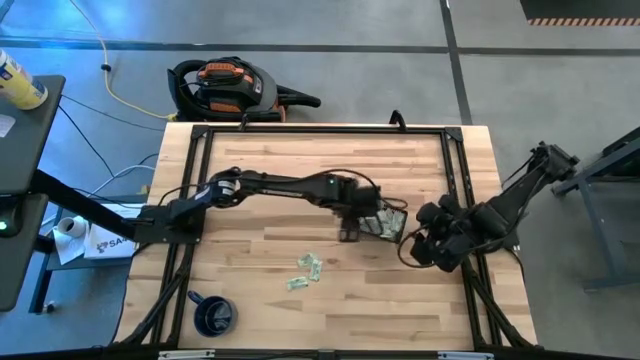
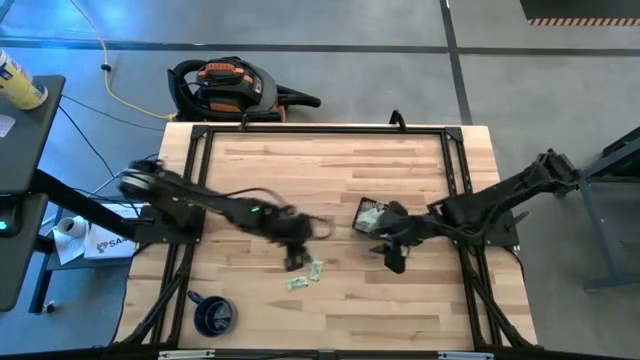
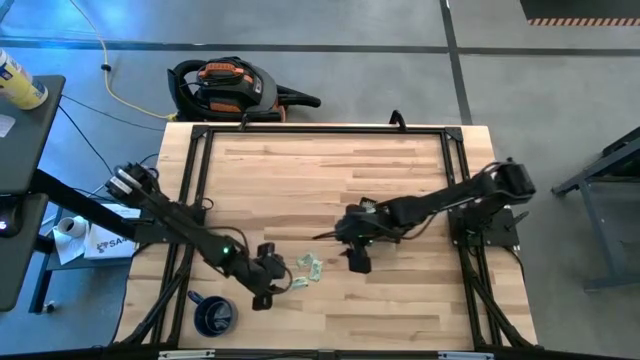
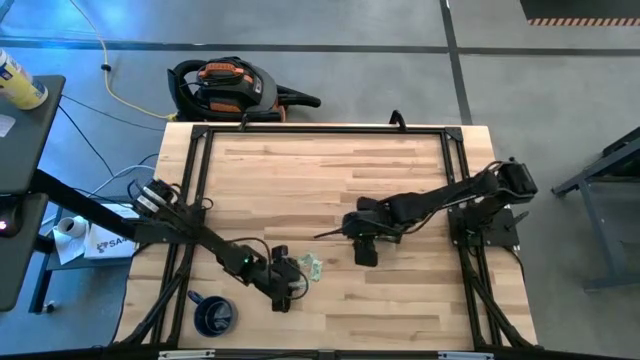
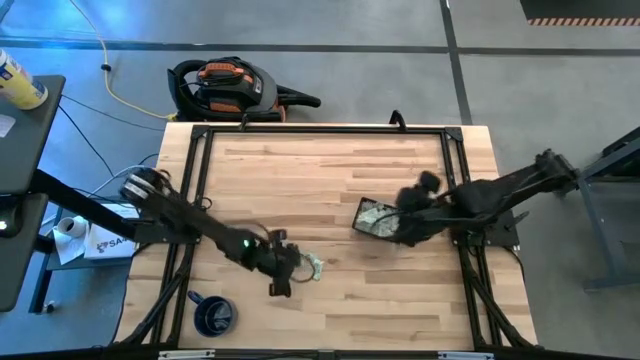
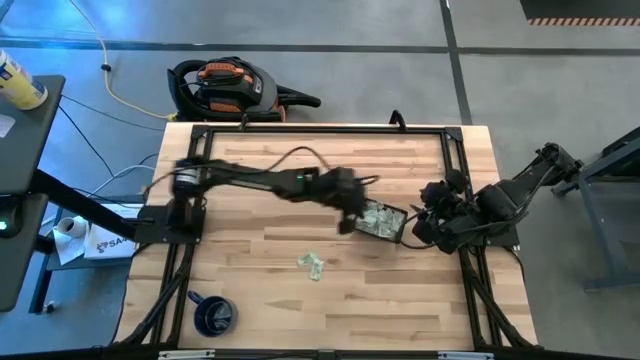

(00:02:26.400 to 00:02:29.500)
Task: Pick and place Stevia / Truvia into bins
Put the stevia packet into the black bin

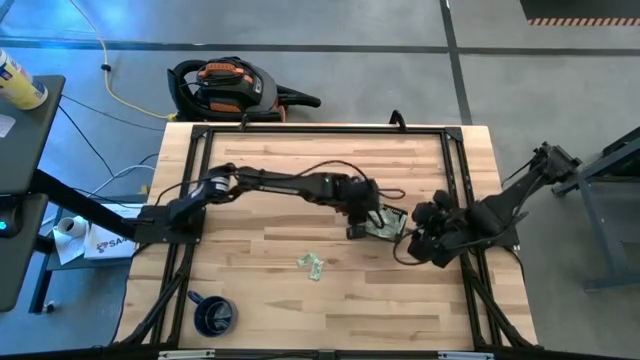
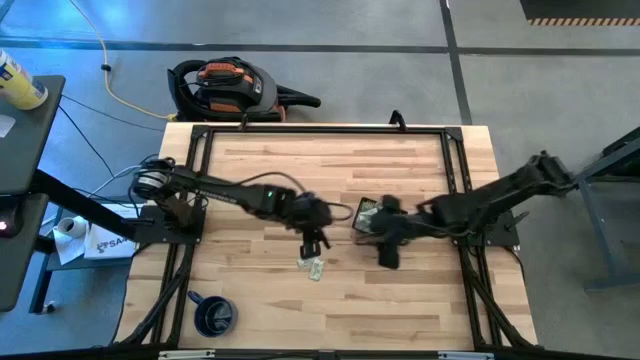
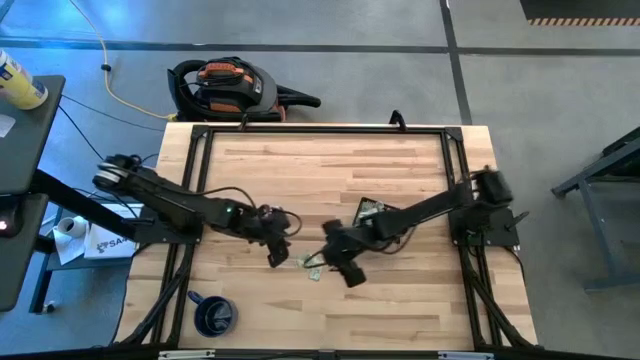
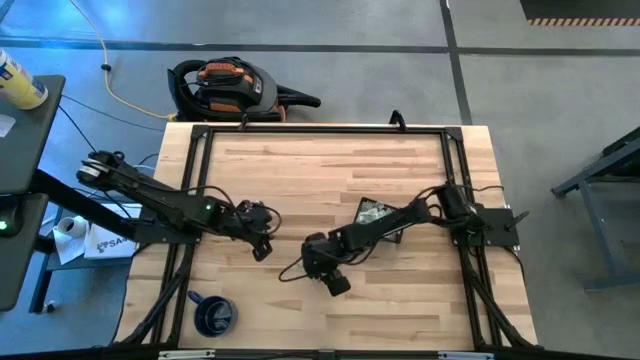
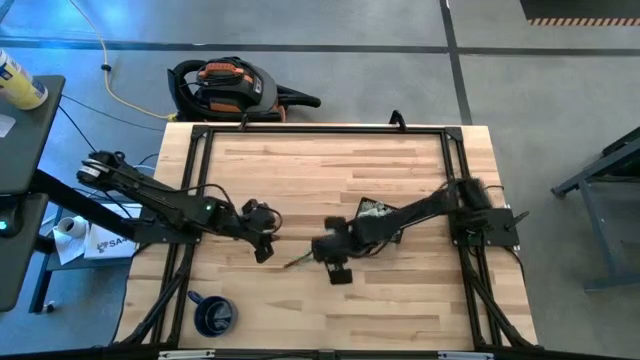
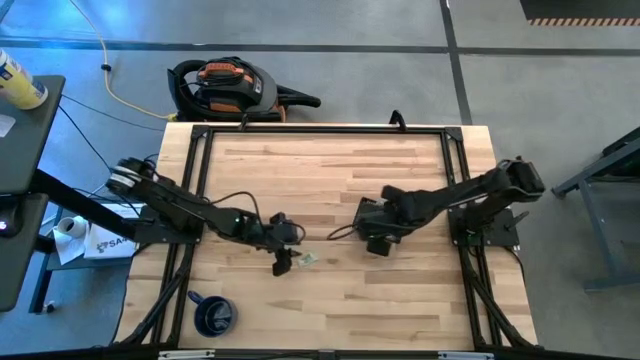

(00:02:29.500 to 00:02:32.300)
Put the stevia packet into the black bin

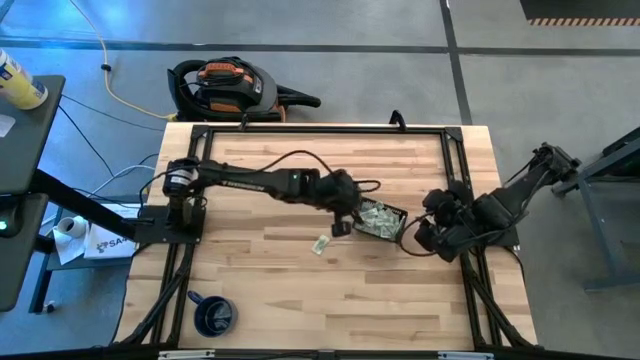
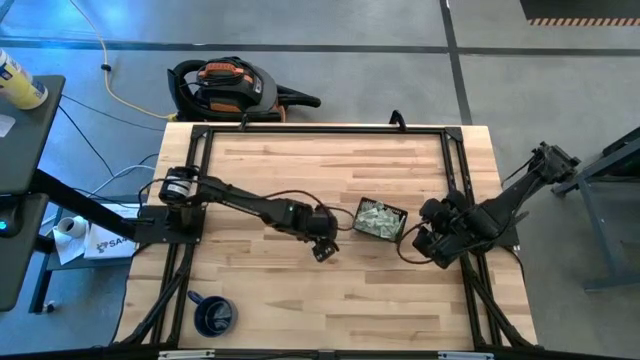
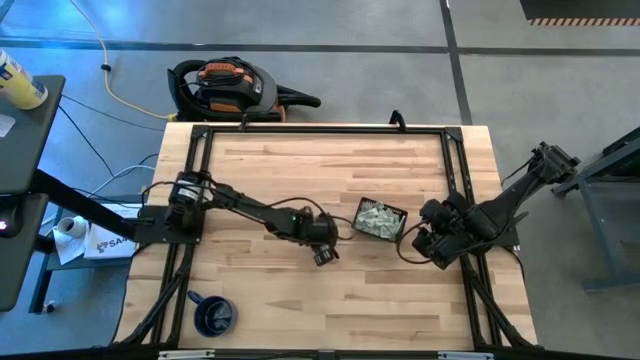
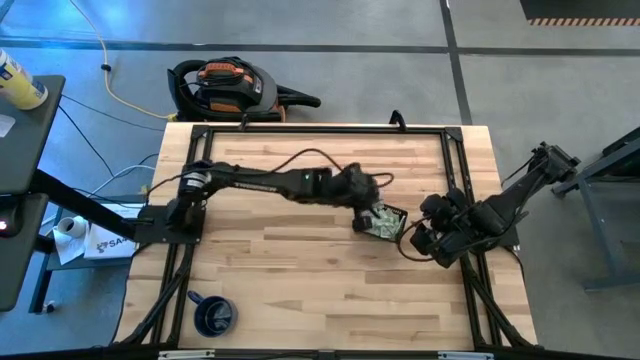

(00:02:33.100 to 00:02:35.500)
Put the stevia packet into the black bin

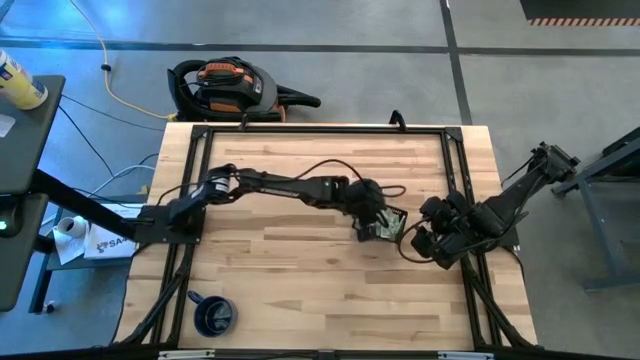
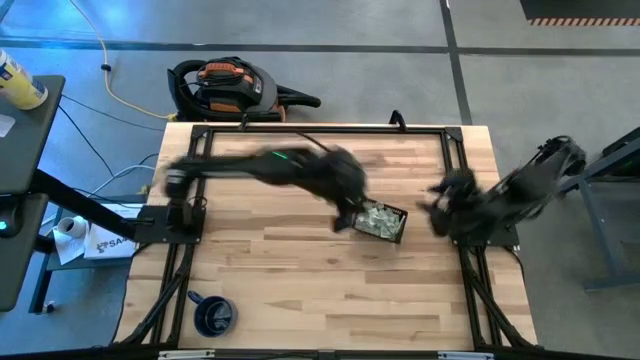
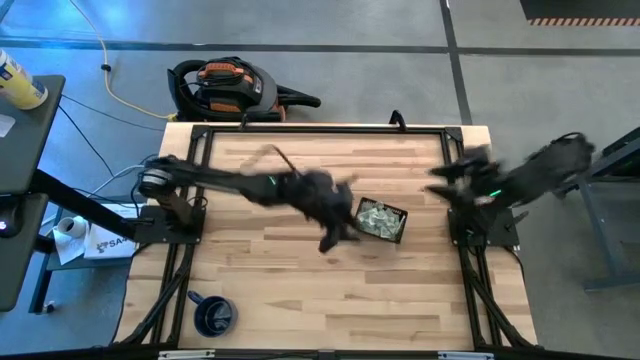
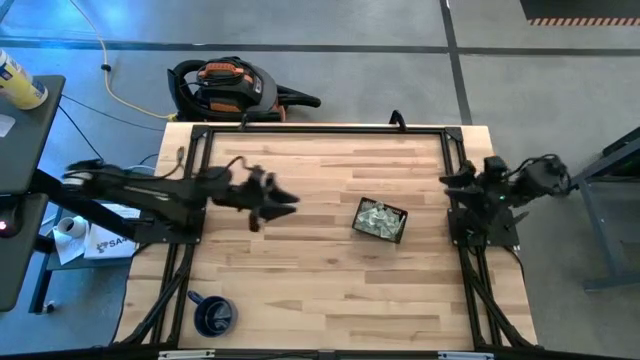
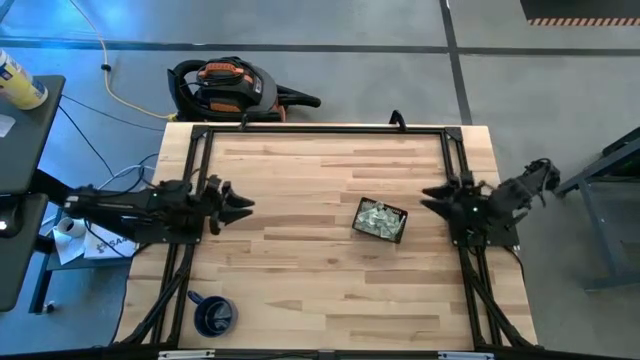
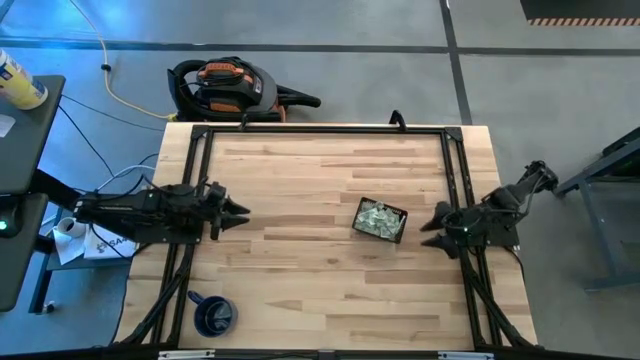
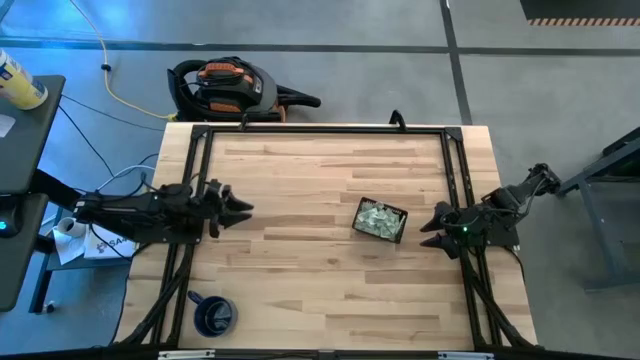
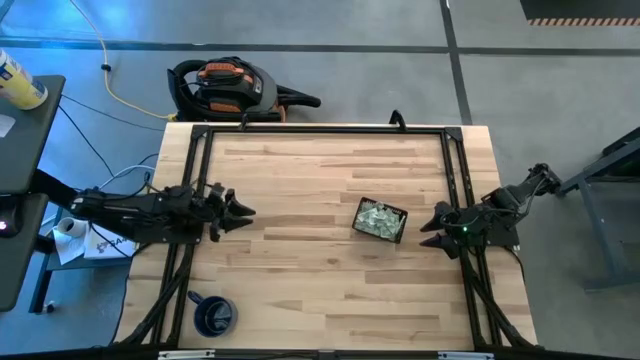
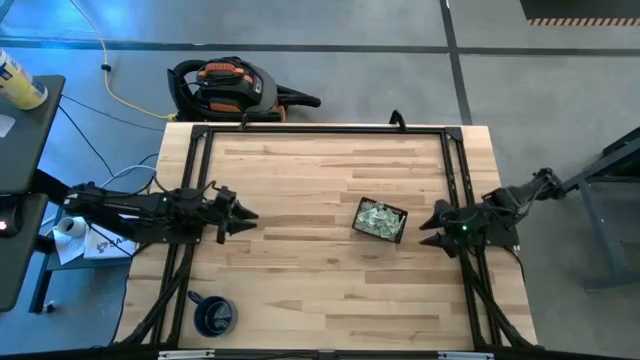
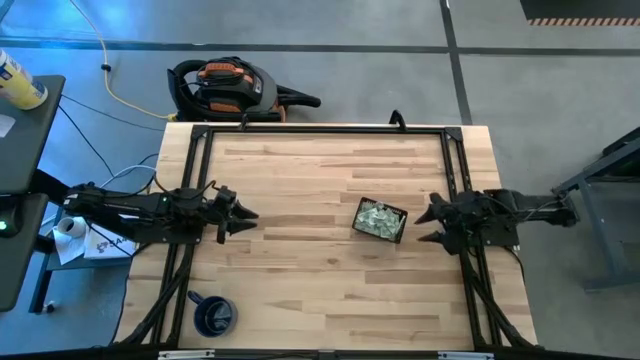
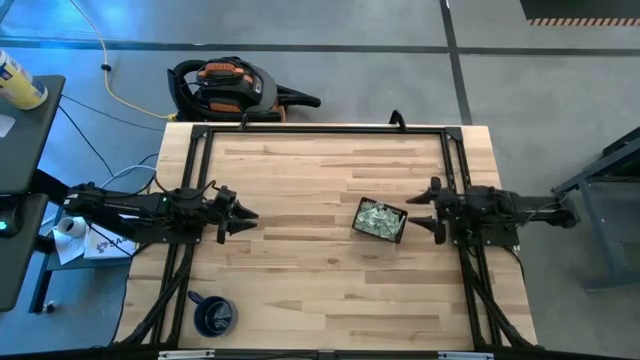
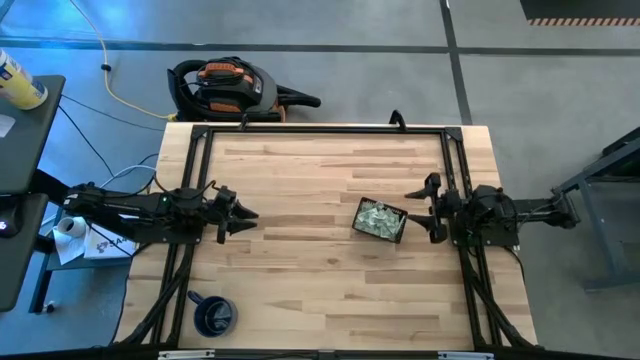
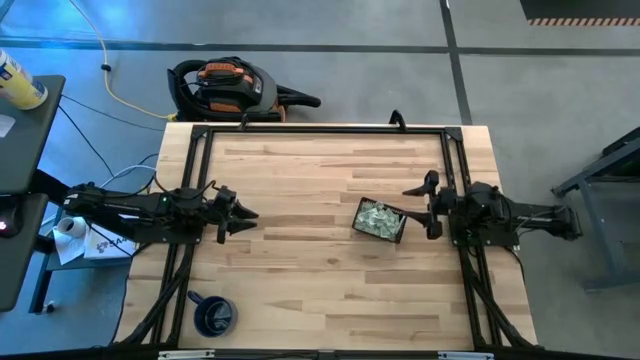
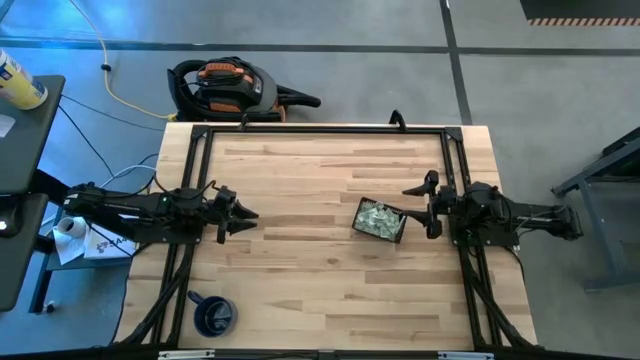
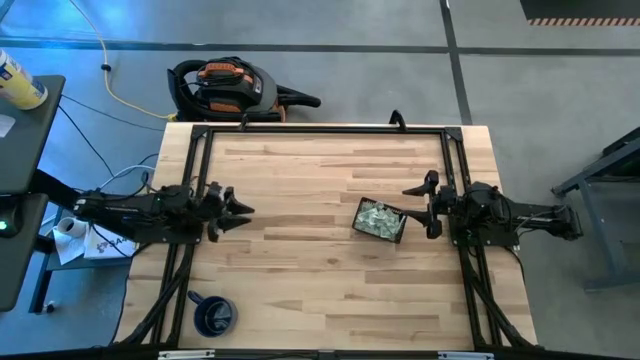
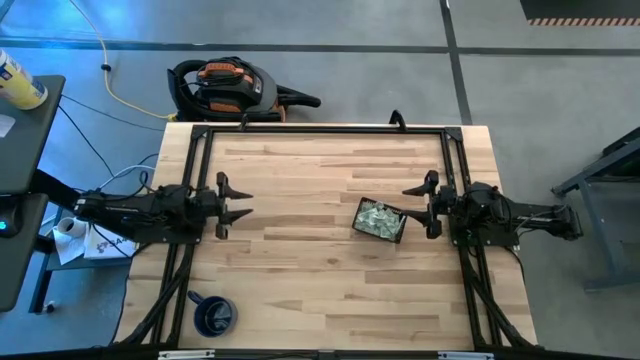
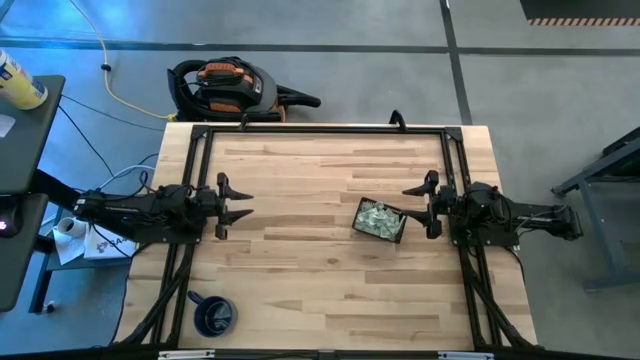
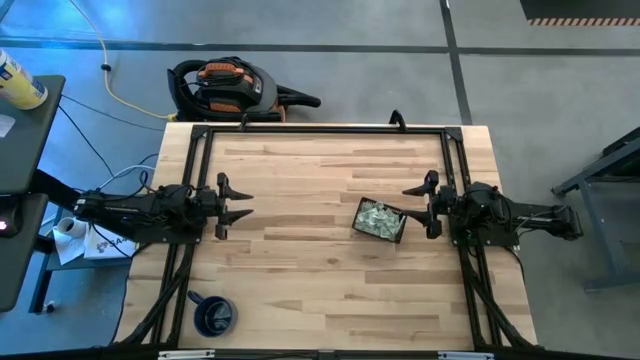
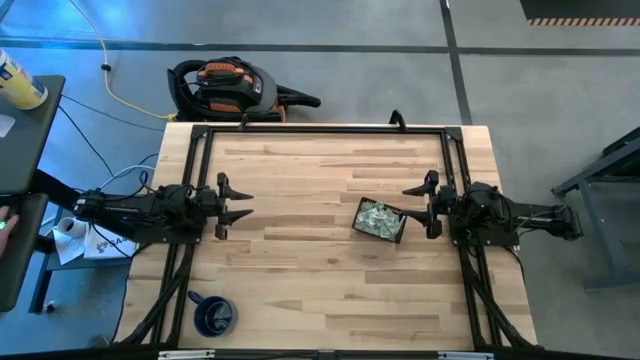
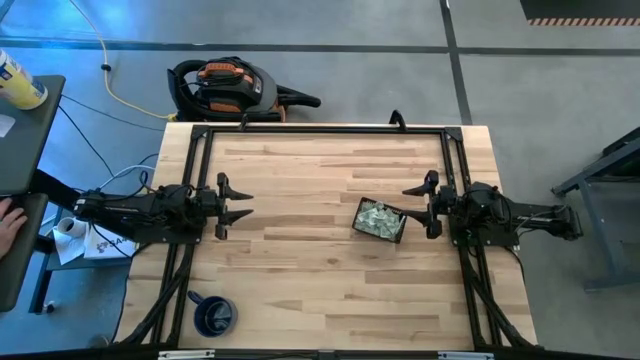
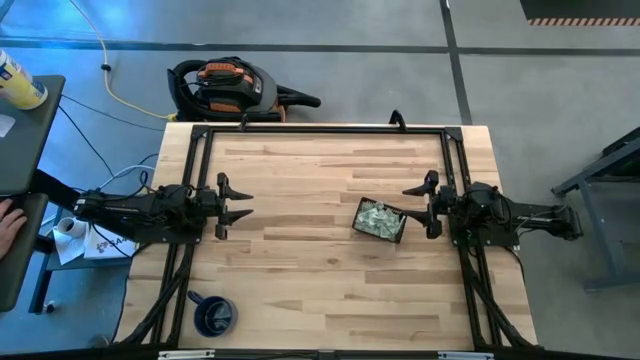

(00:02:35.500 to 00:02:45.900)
Return to Home Position

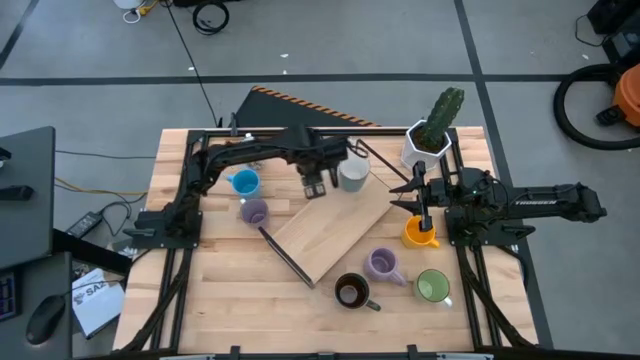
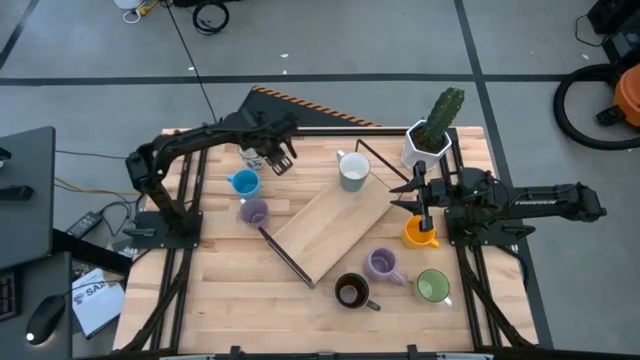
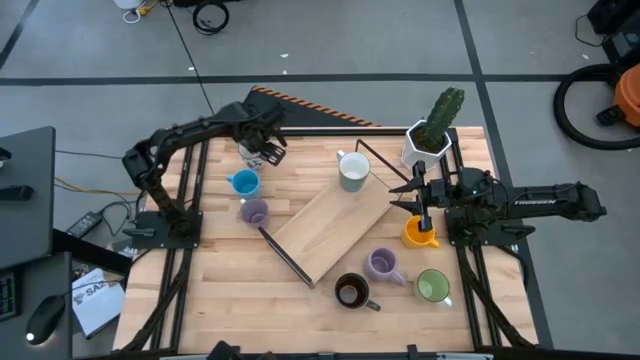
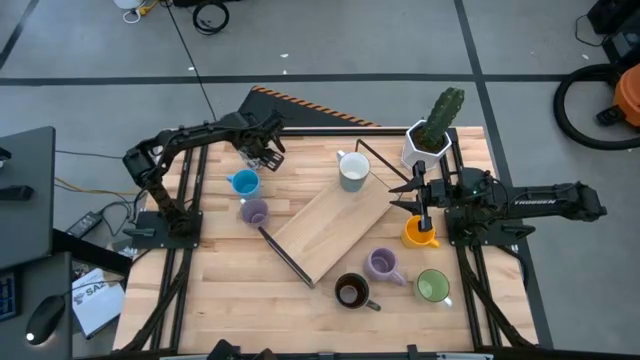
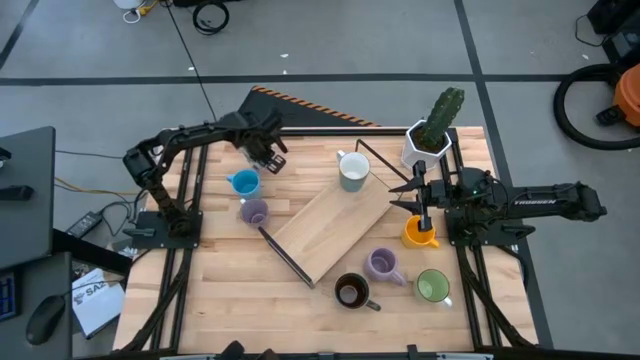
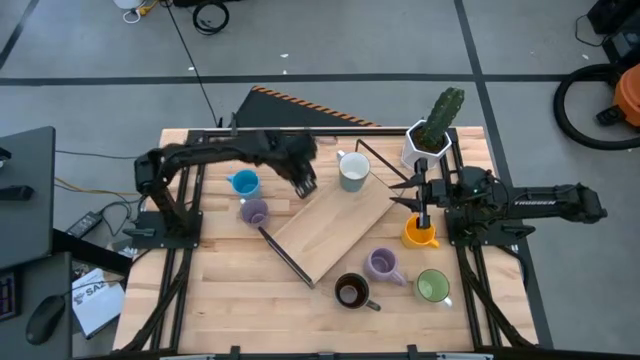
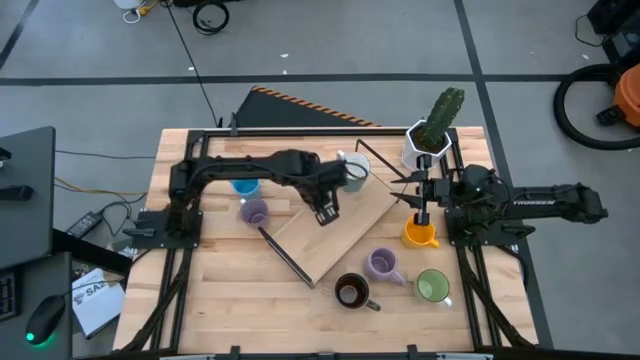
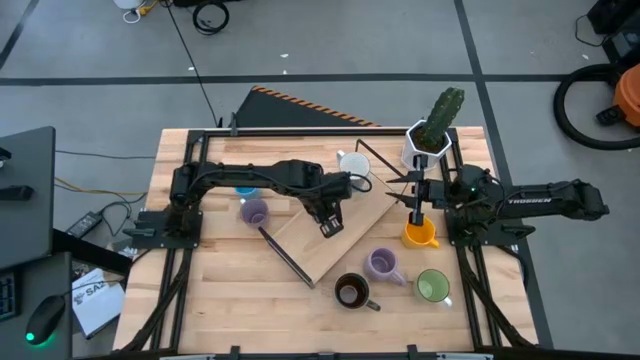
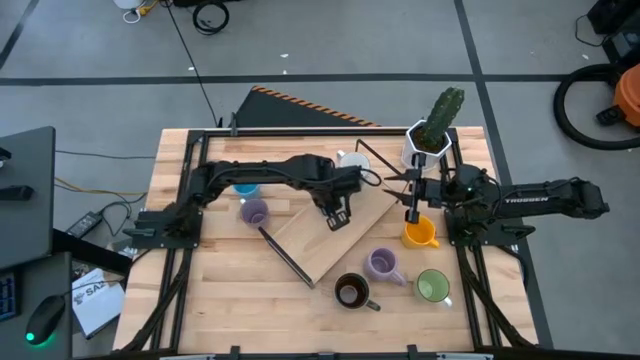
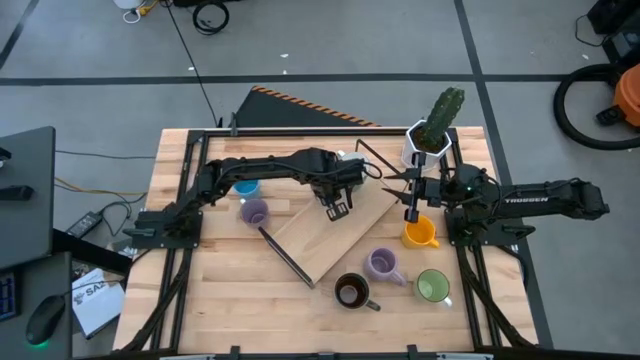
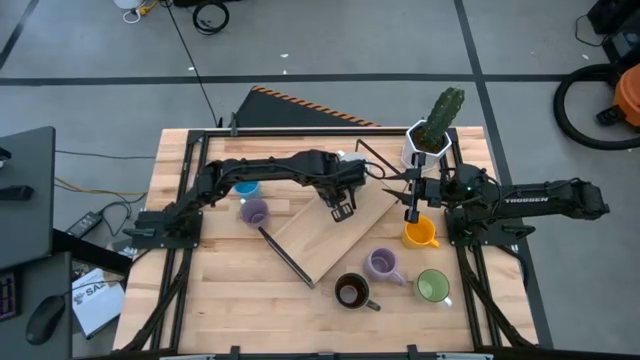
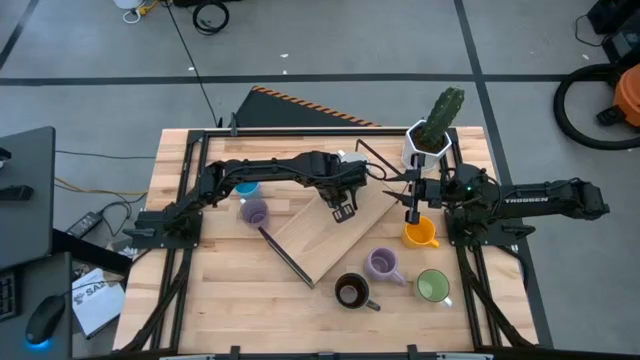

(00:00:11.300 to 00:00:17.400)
Task: Place coffee mugs
Put the white mug on the shelf
